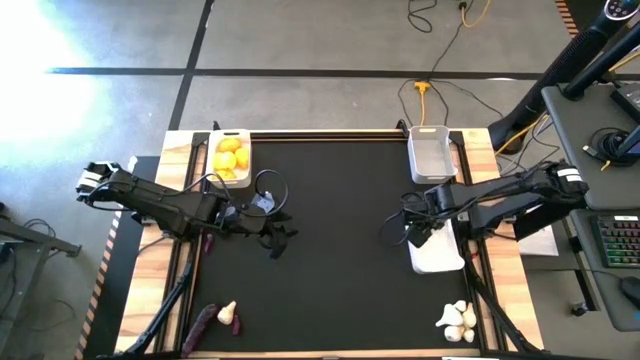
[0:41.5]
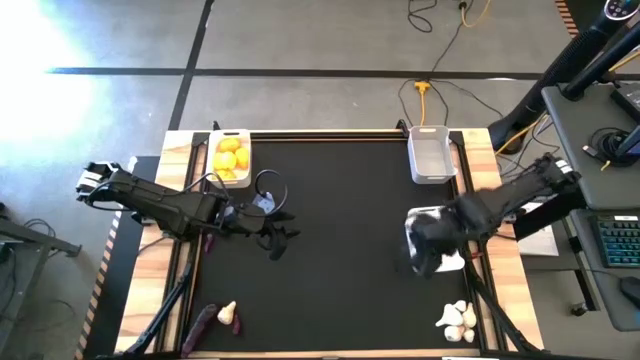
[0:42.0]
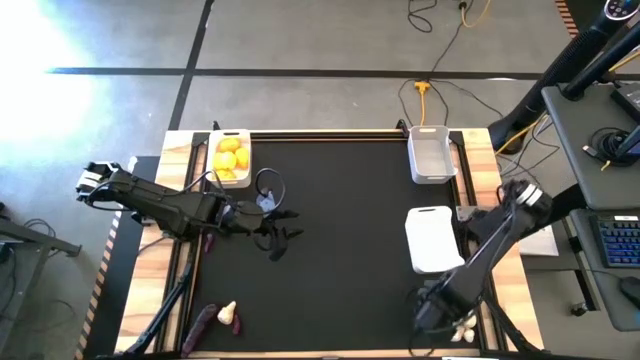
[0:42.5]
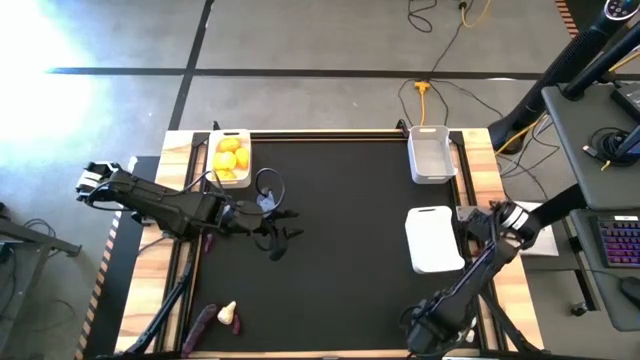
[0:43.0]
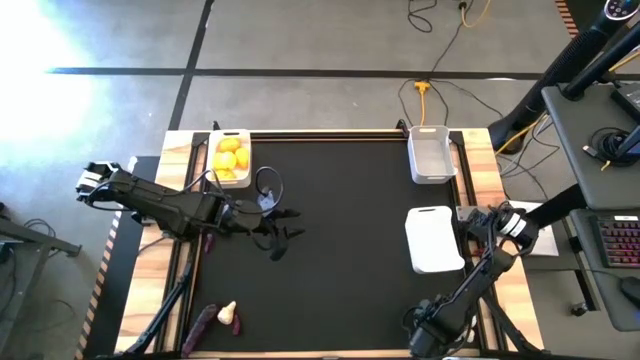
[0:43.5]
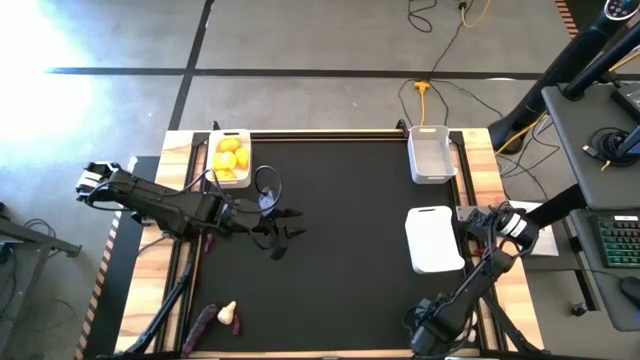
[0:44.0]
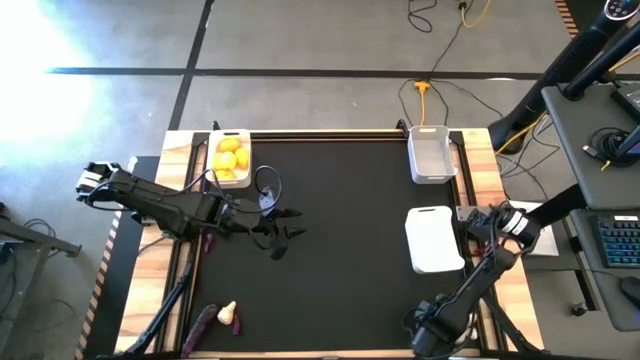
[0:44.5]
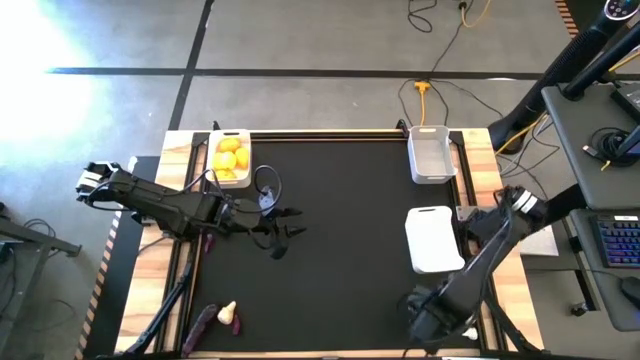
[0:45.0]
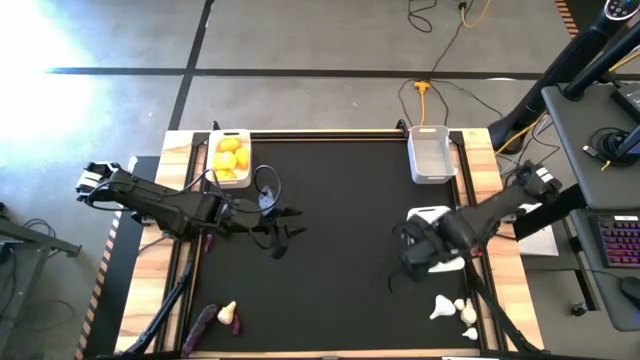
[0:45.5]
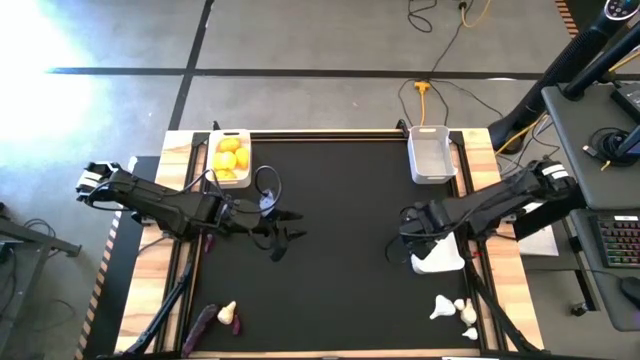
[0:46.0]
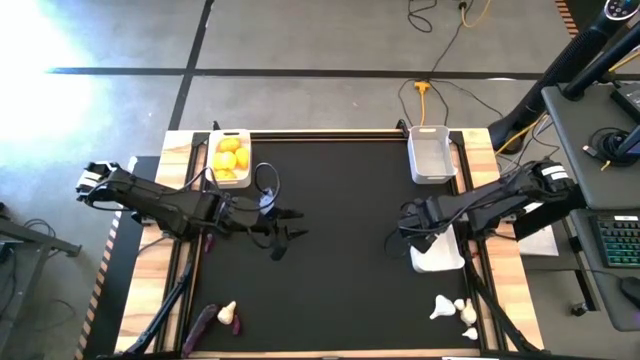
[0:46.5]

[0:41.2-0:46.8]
Task: Sort produce into baskets
Put the white garlic into the right white bin

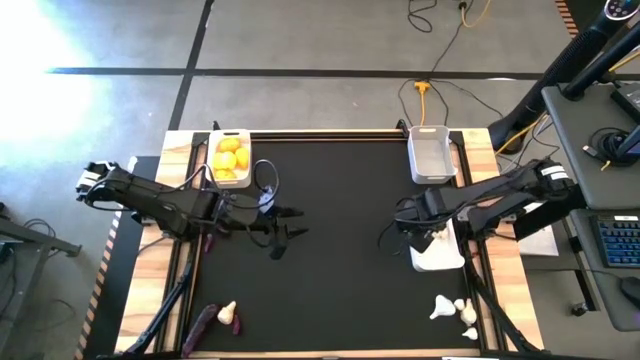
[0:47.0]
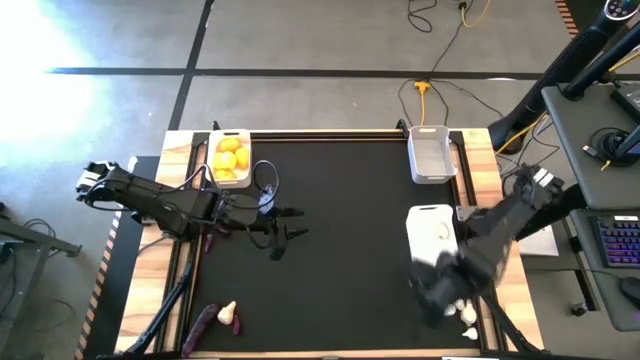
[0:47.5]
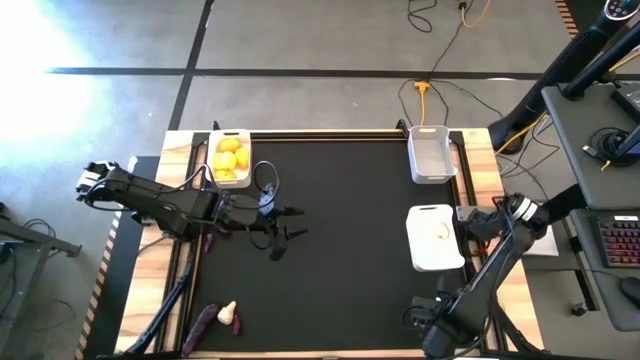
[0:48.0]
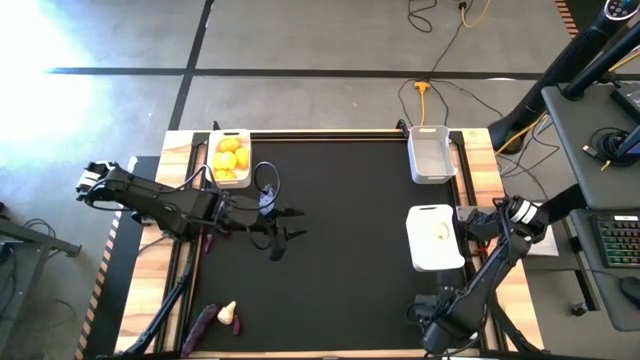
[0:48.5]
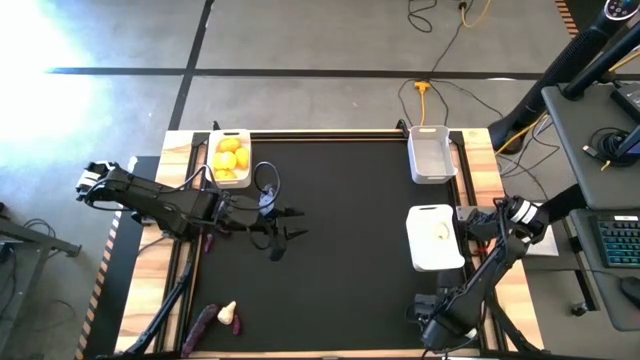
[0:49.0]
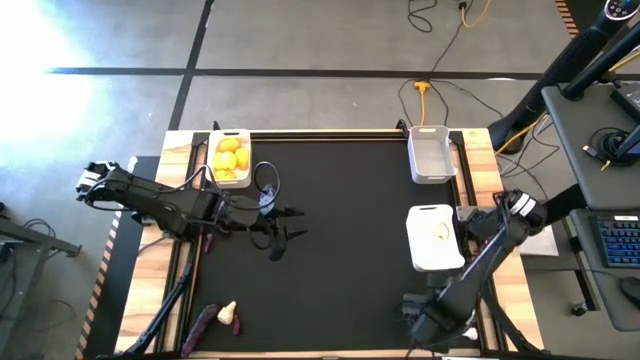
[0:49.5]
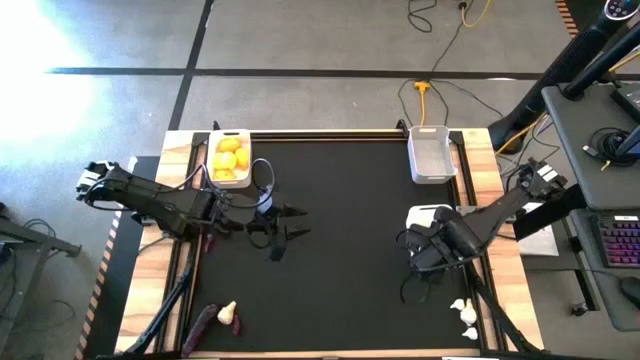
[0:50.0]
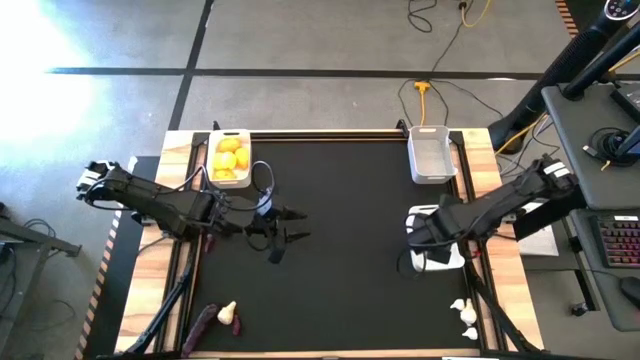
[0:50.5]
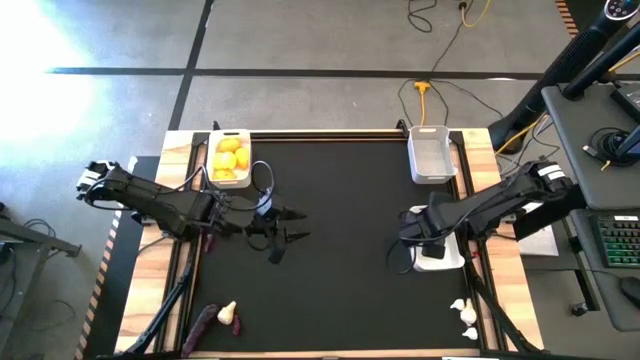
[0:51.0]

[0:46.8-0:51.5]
Put the white garlic into the right white bin

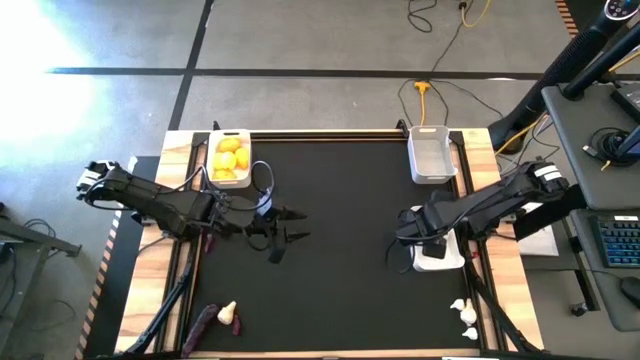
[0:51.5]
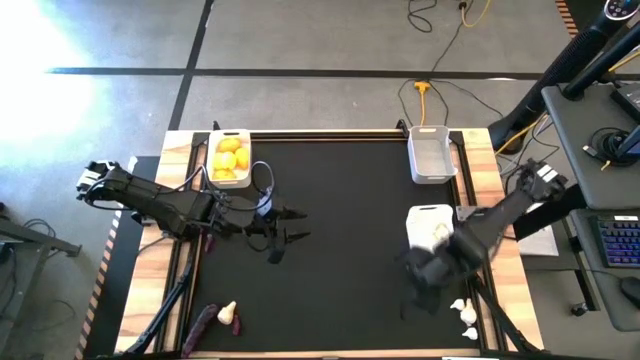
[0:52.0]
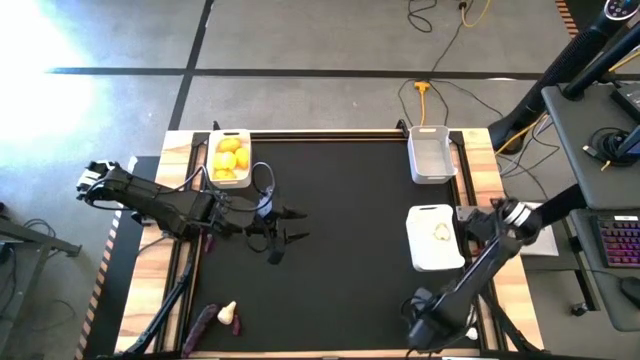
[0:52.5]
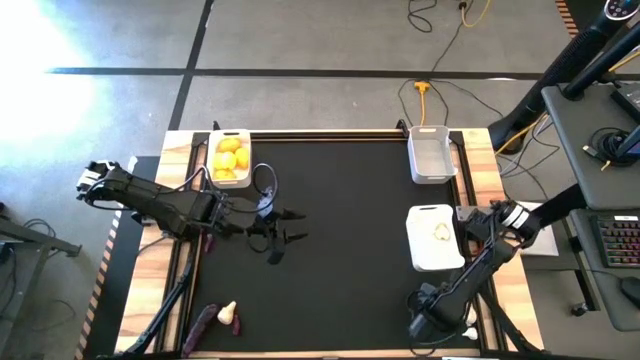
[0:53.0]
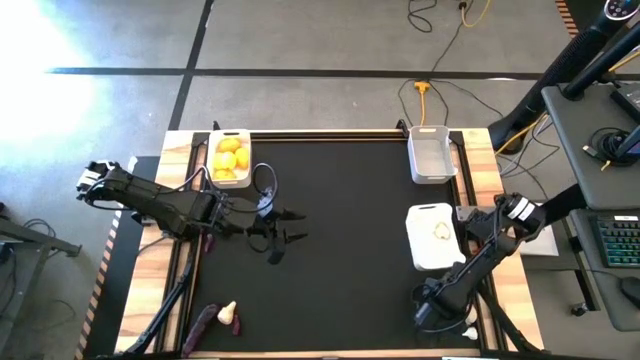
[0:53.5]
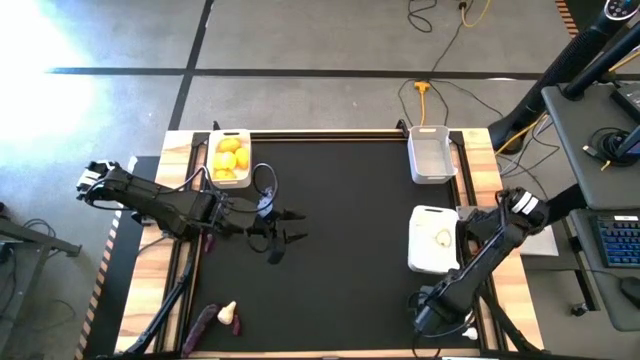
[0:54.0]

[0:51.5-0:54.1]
Put the white garlic into the right white bin

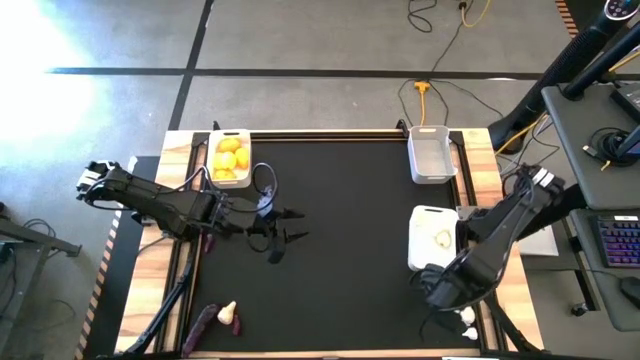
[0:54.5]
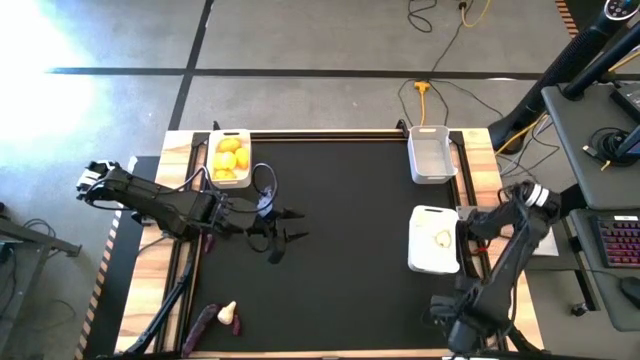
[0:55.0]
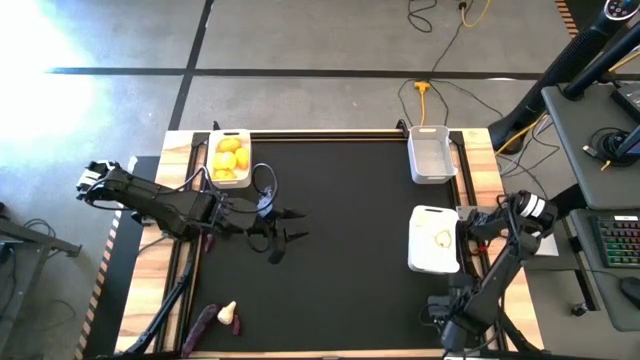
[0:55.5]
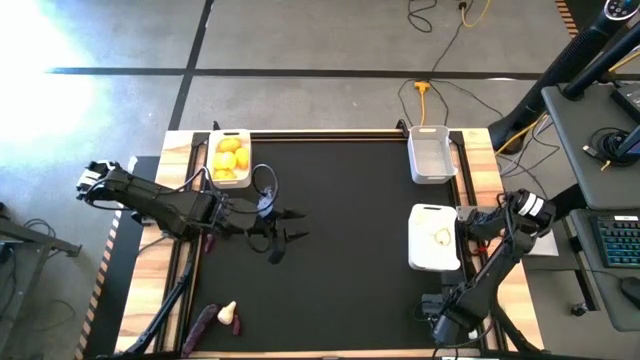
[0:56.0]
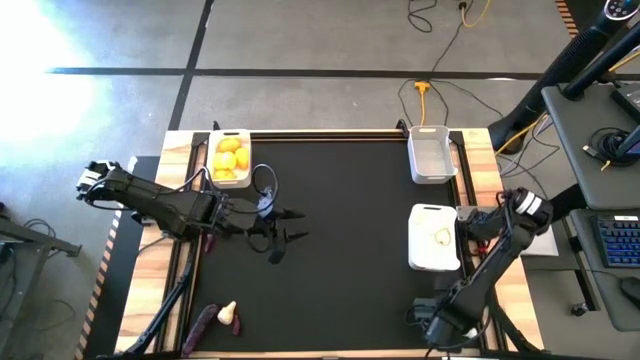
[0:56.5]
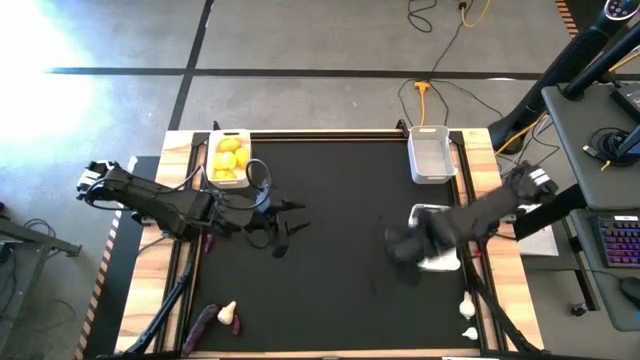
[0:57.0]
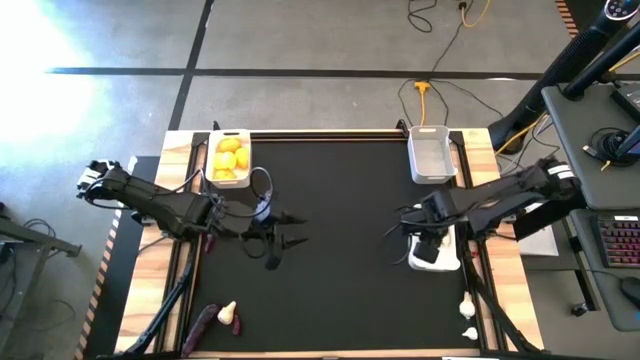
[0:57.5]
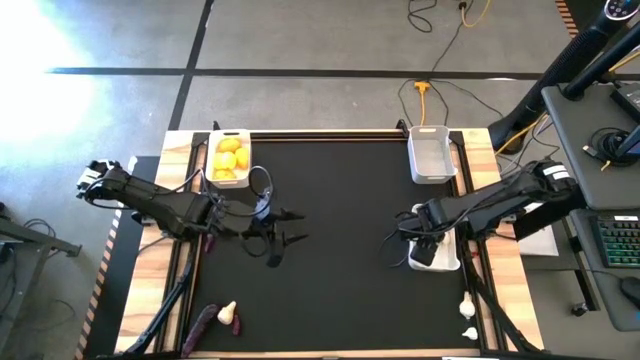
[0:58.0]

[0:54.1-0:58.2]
Put the white garlic into the right white bin

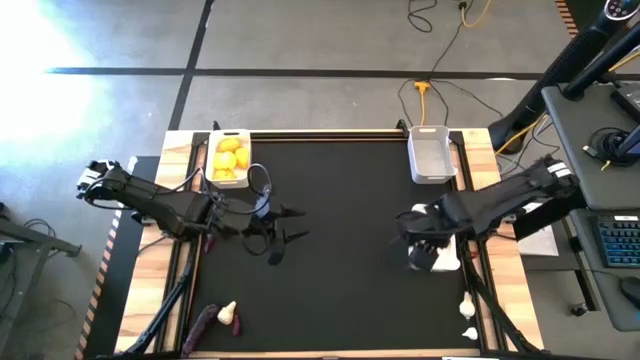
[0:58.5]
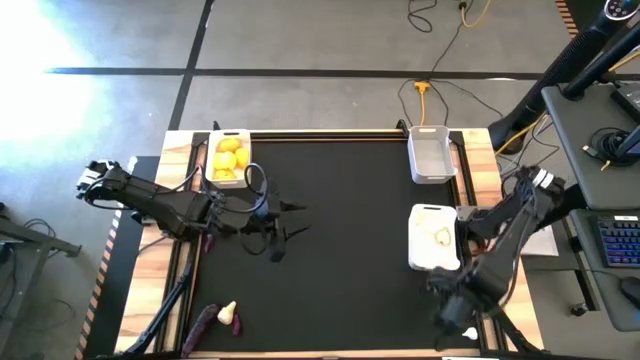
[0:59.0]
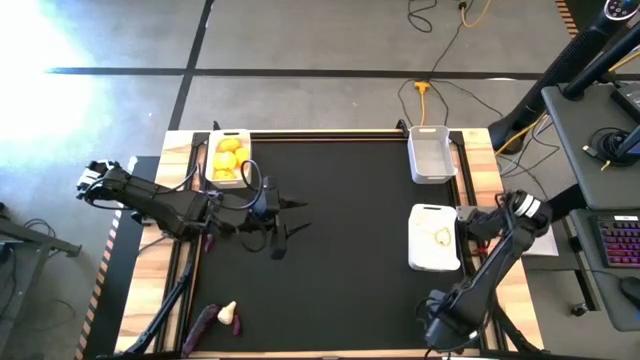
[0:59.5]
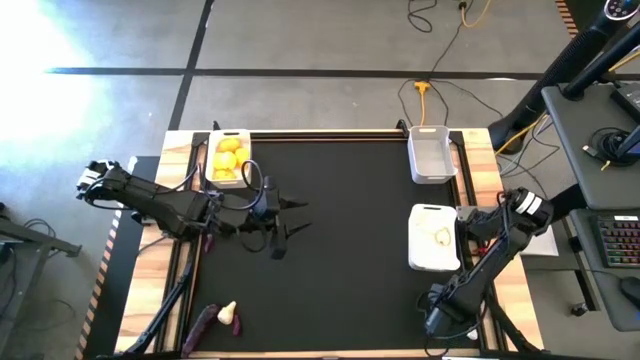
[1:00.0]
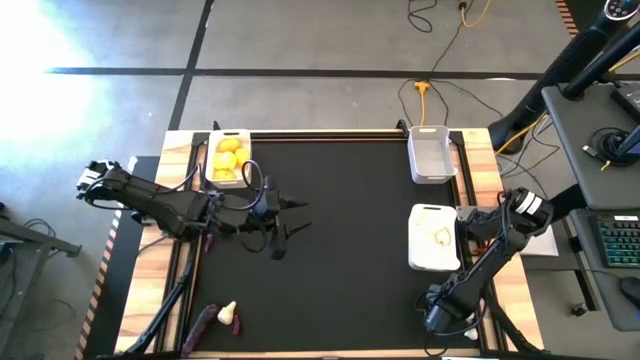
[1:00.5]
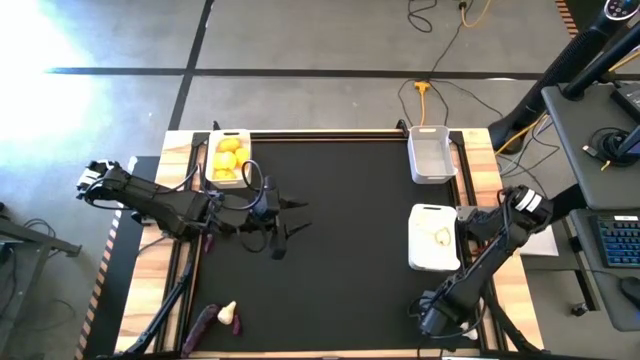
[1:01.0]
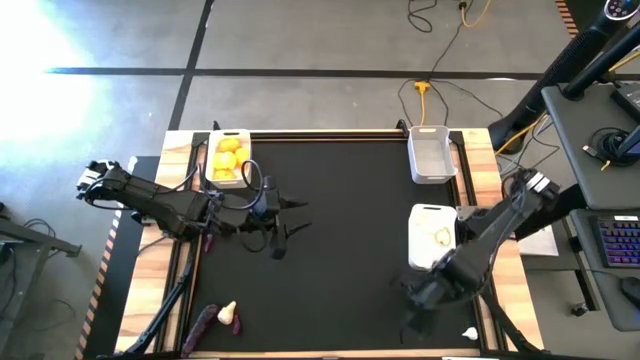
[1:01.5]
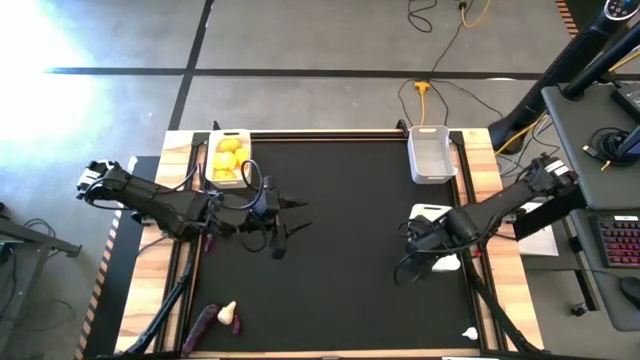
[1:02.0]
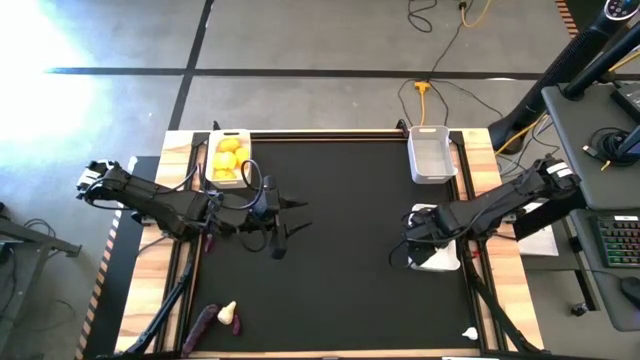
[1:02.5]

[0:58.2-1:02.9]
Put the white garlic into the right white bin
